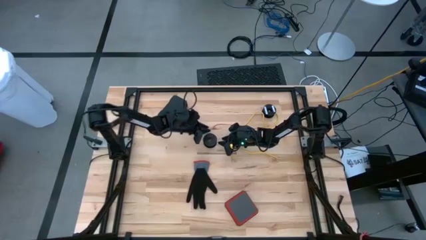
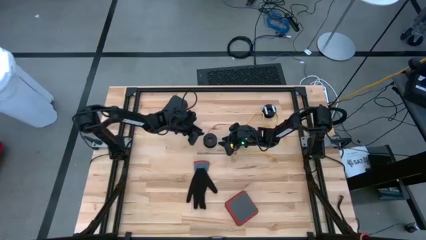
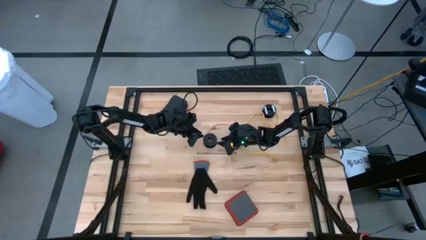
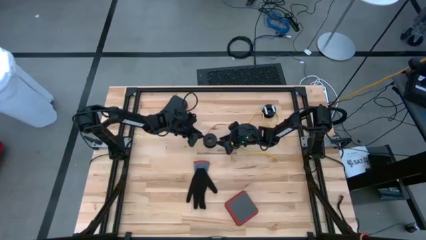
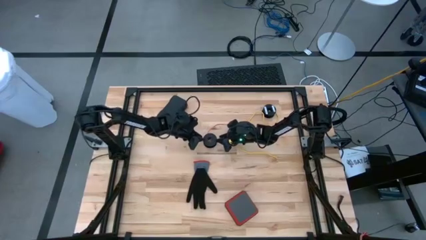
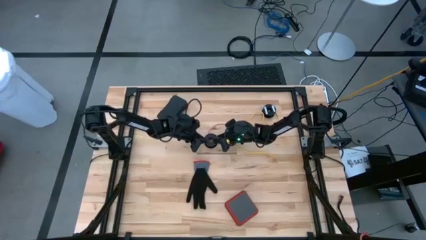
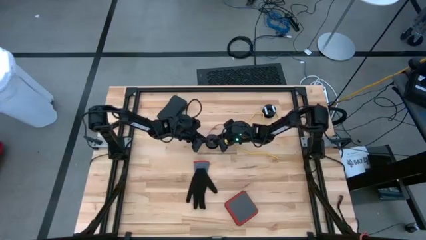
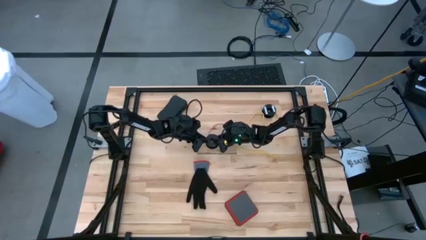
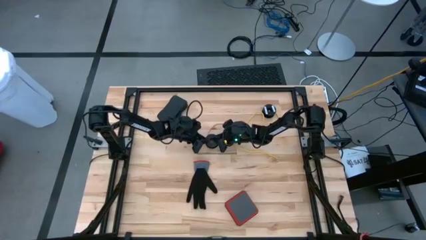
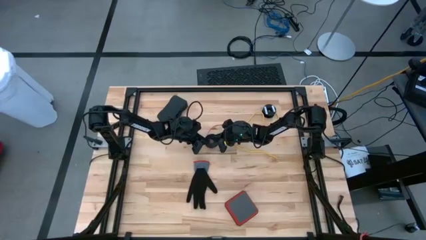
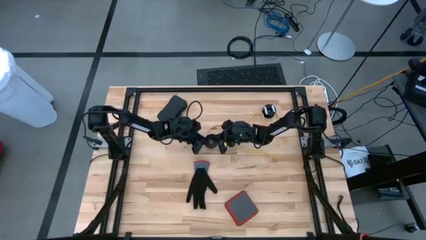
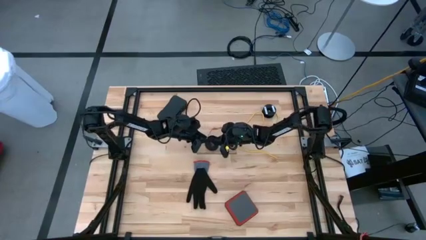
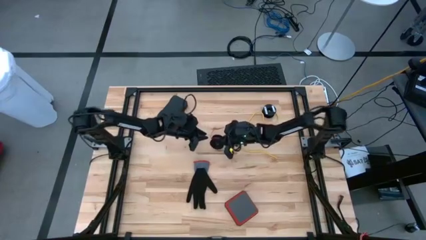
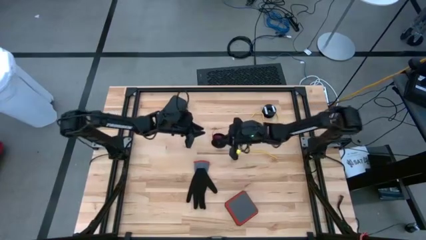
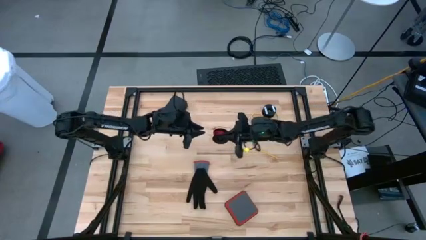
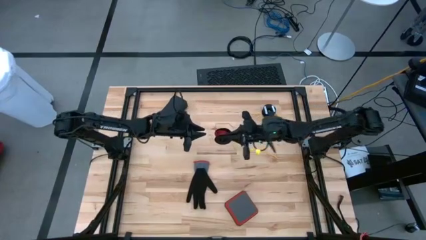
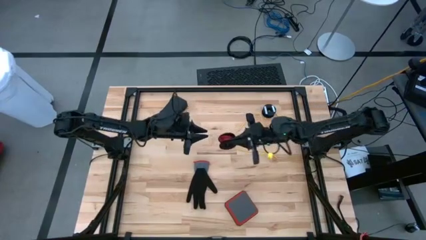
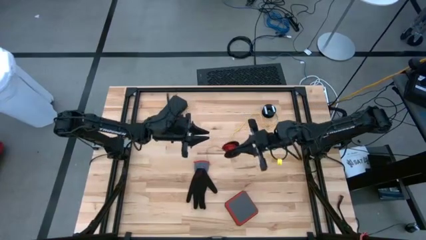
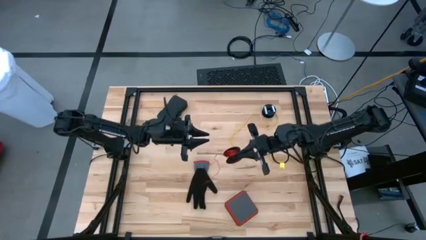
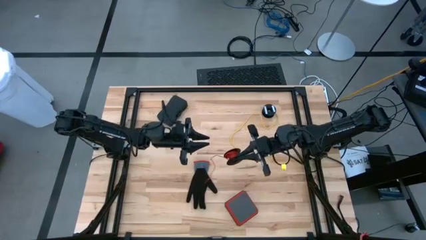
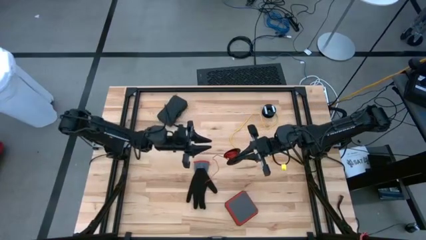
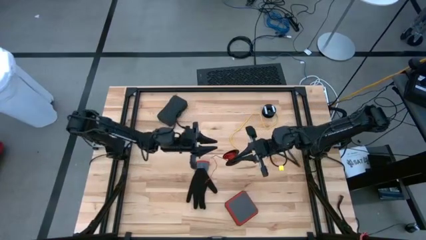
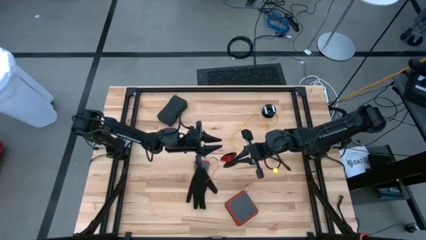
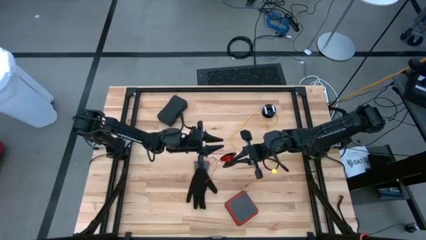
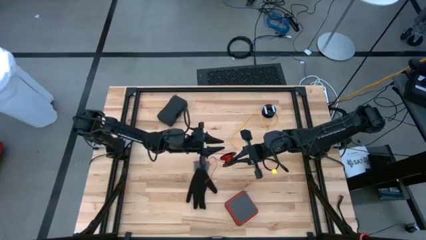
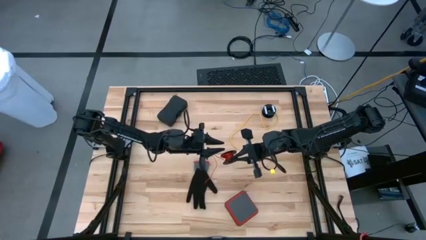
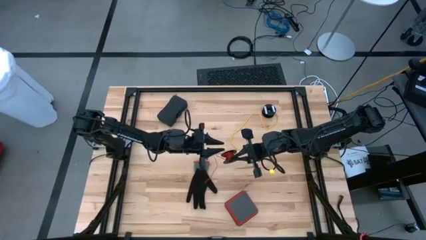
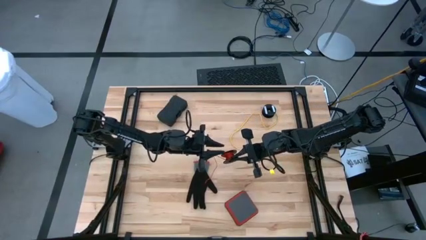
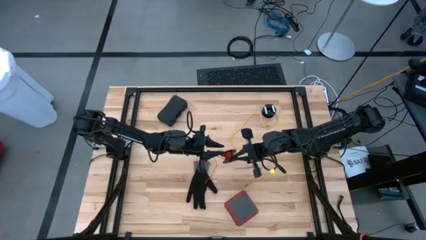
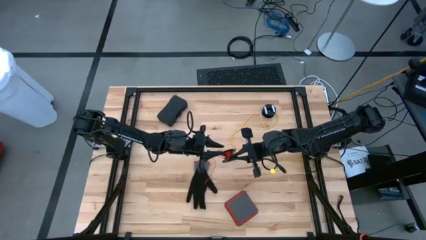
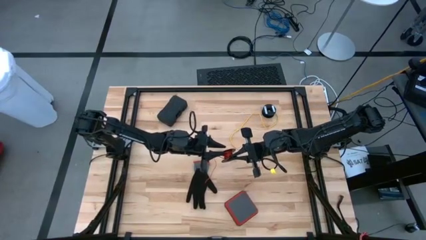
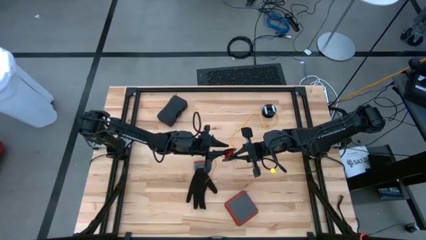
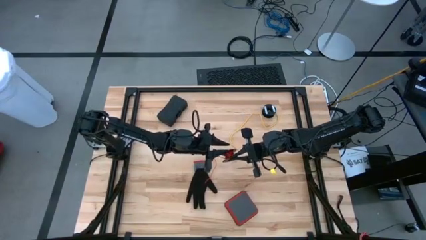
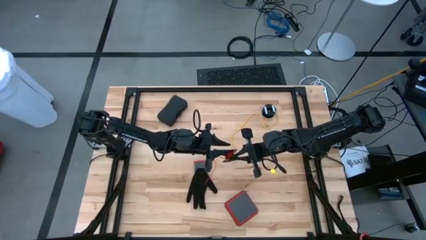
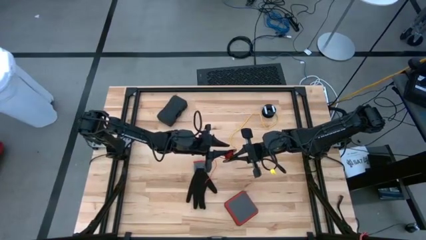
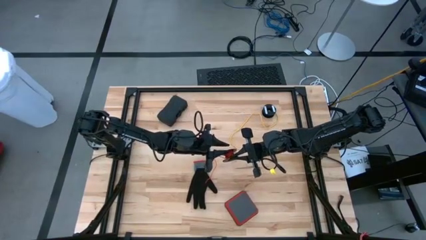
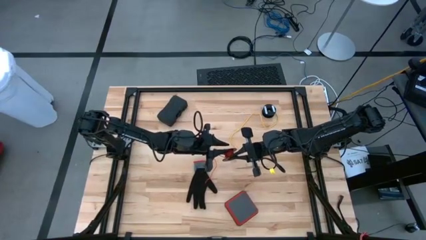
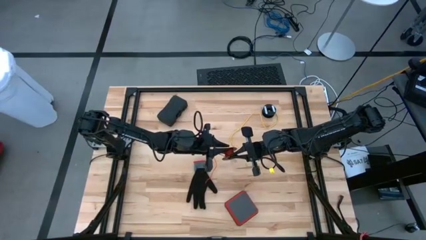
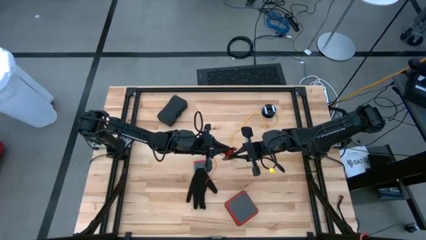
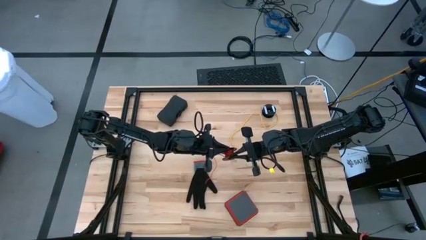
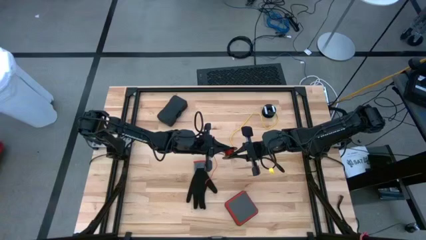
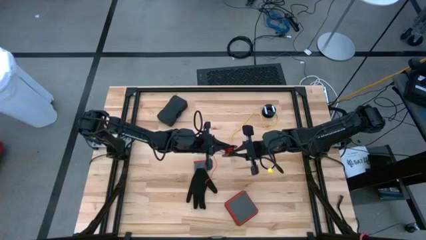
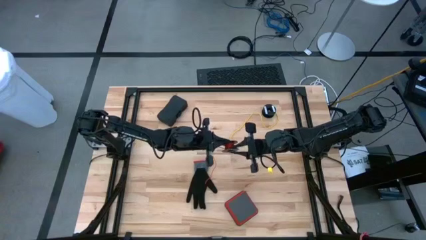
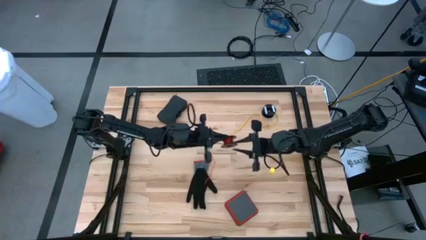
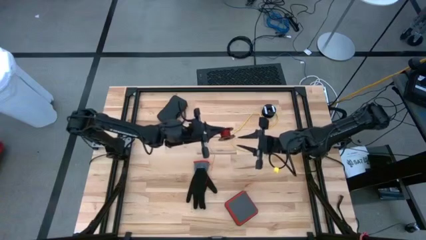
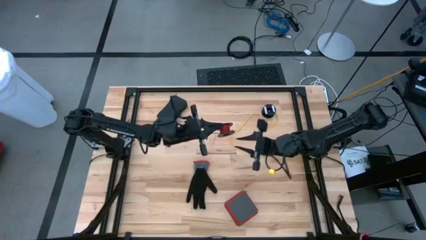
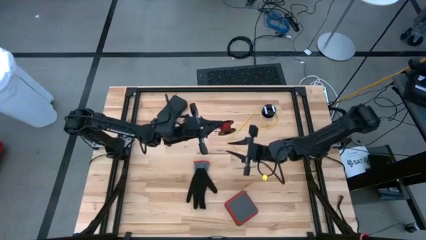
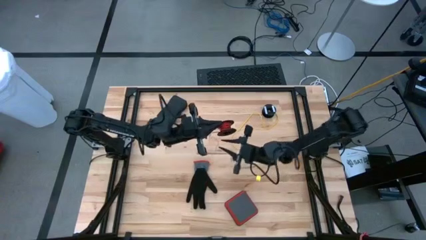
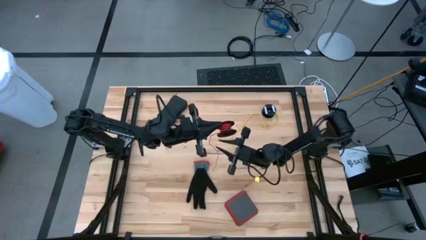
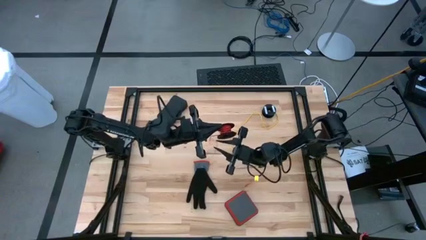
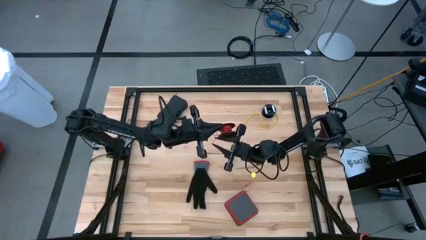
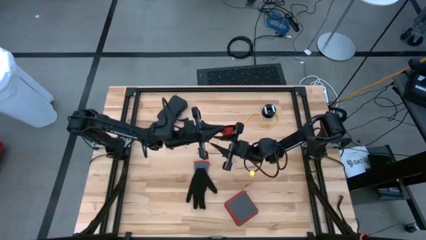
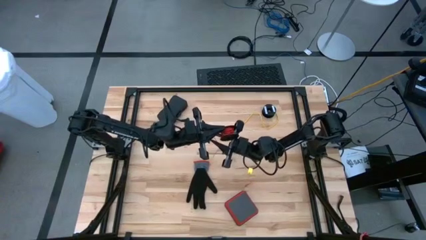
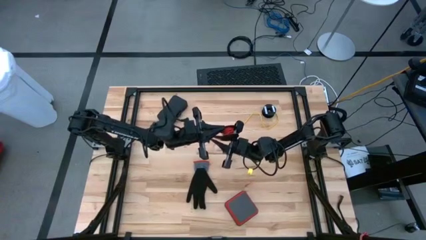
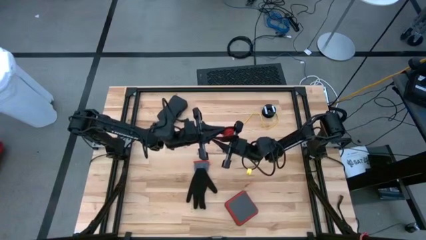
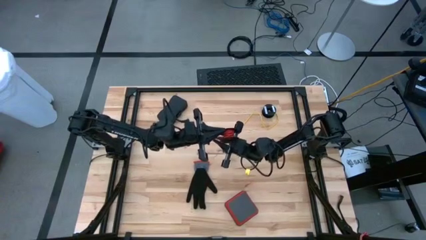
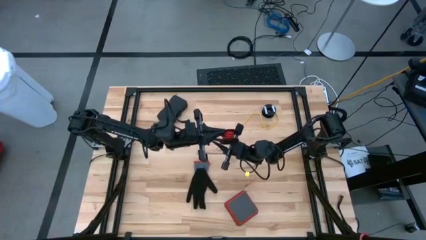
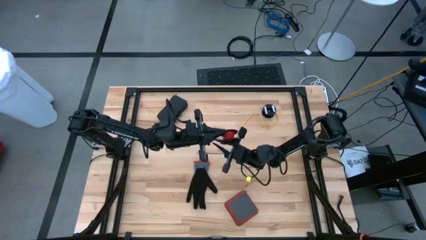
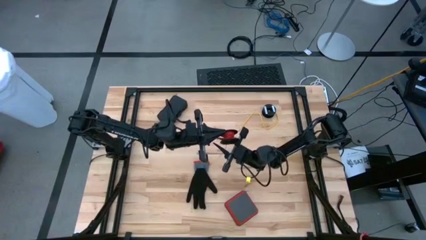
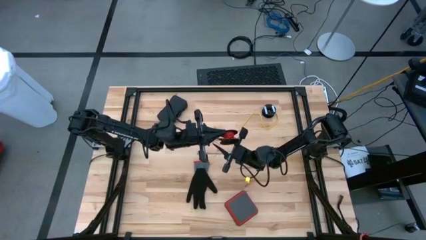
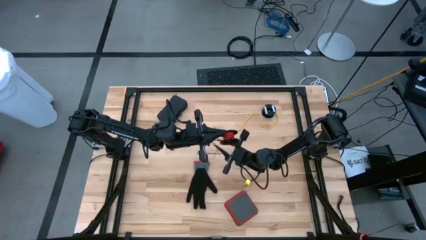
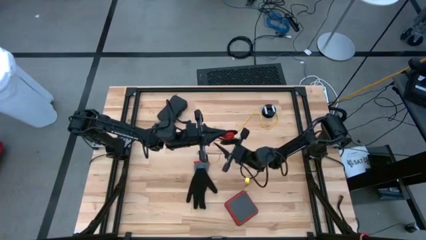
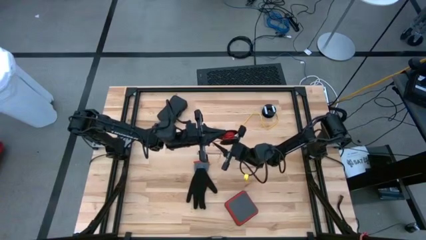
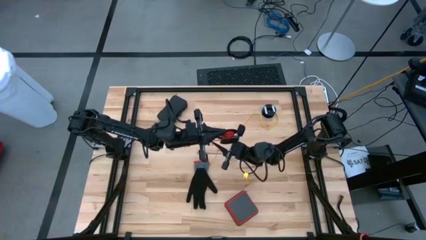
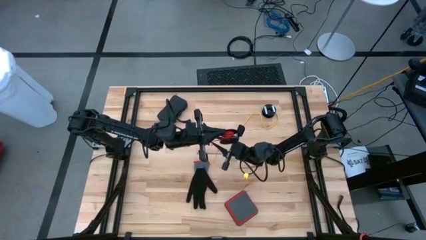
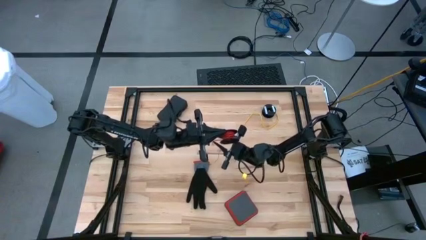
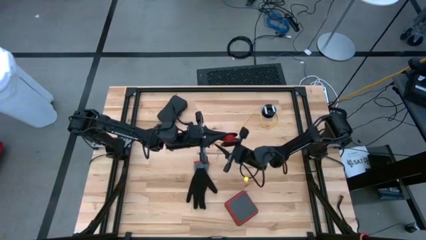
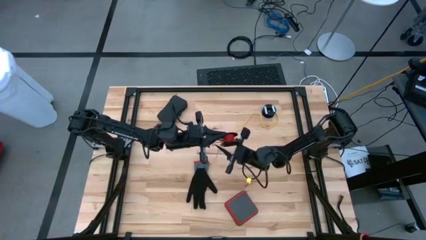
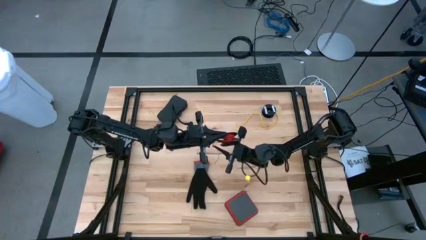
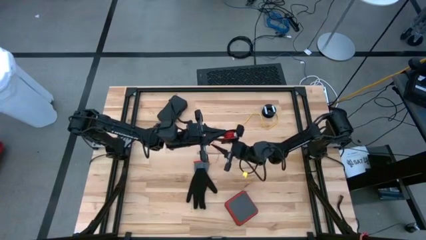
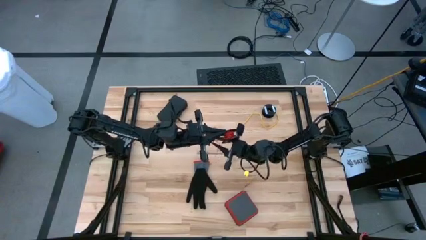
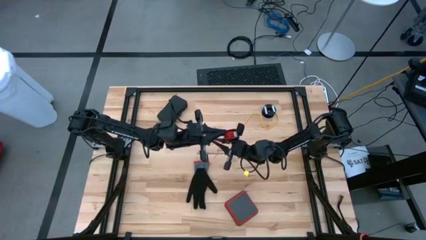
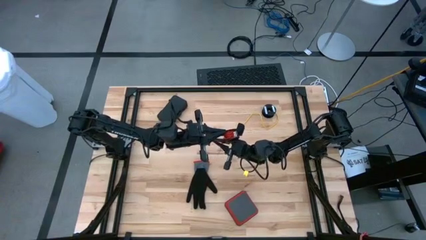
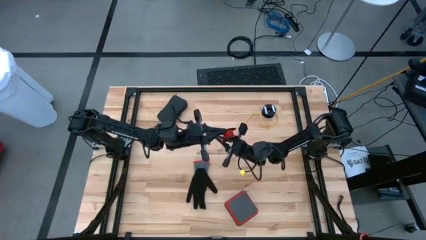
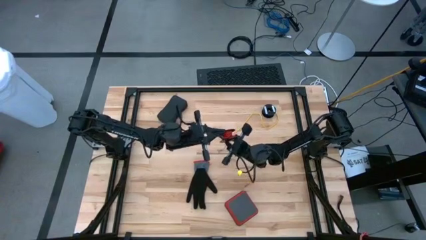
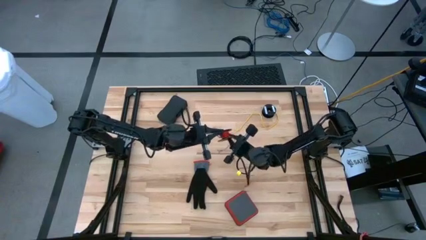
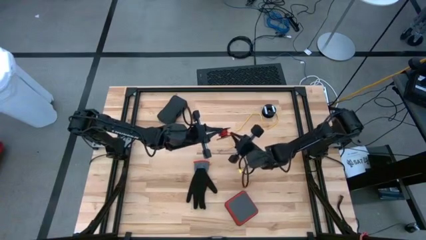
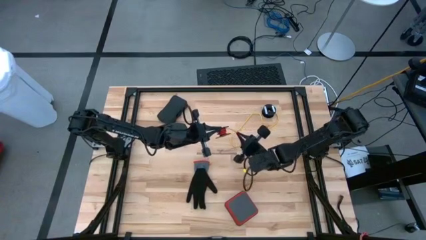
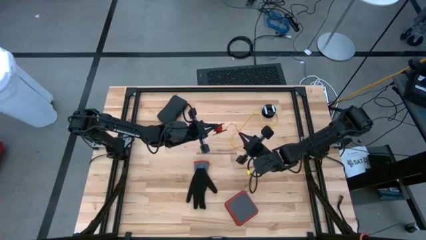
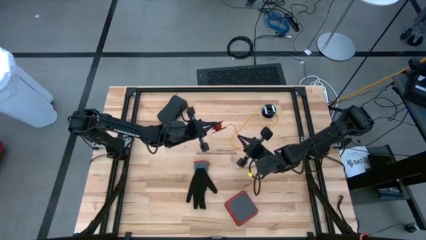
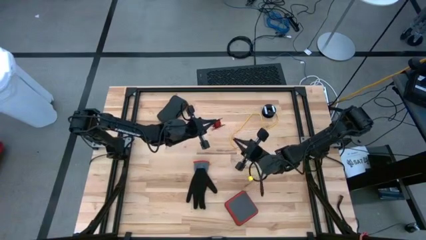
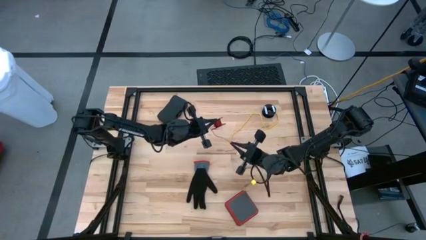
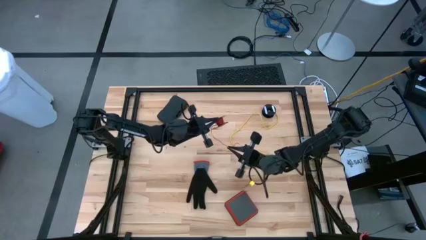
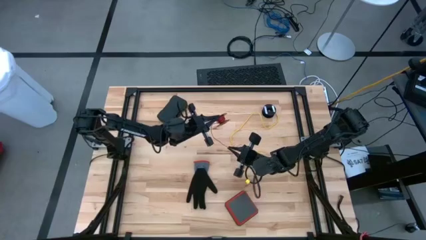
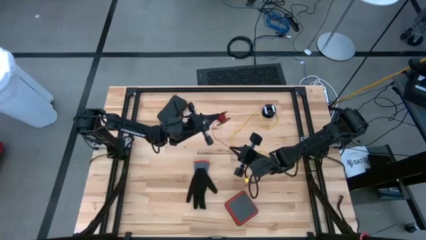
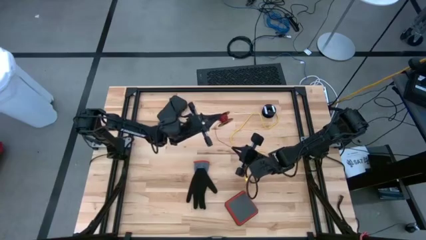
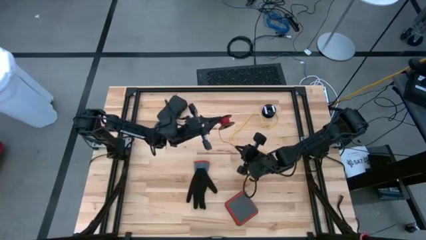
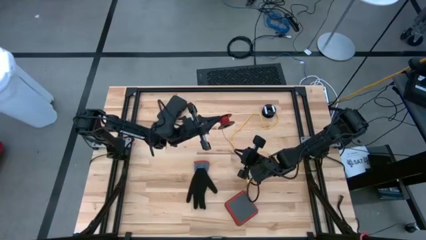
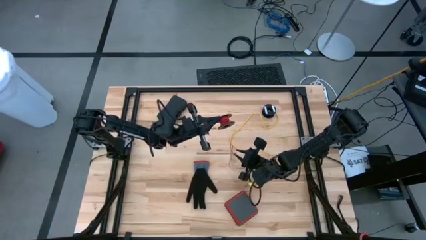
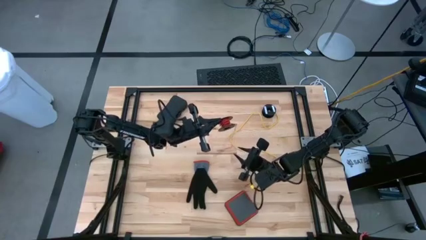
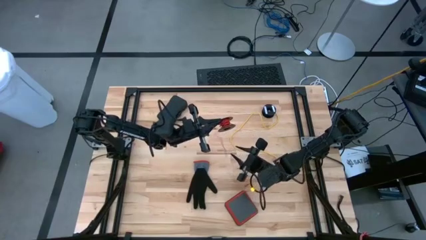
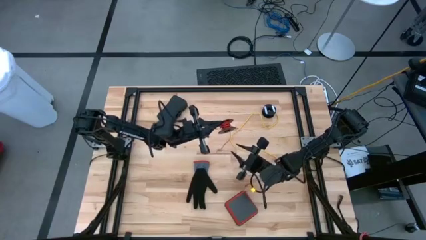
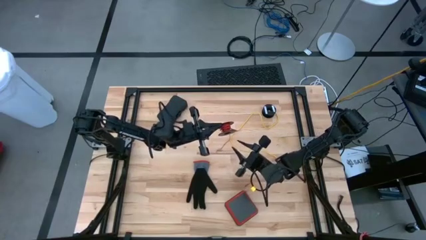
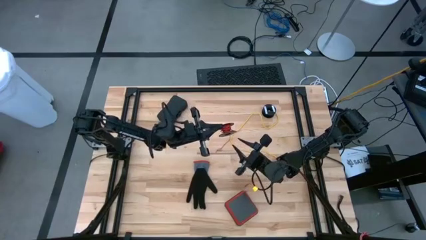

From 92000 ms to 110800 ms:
Task: Coil cords
Uncoil the red wire from the black spool
